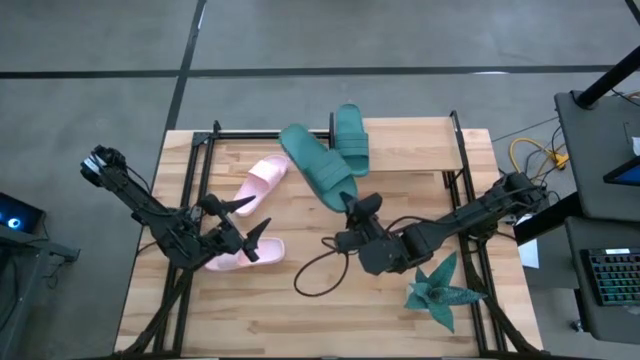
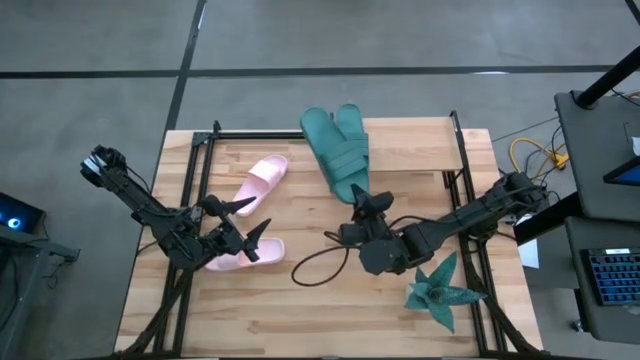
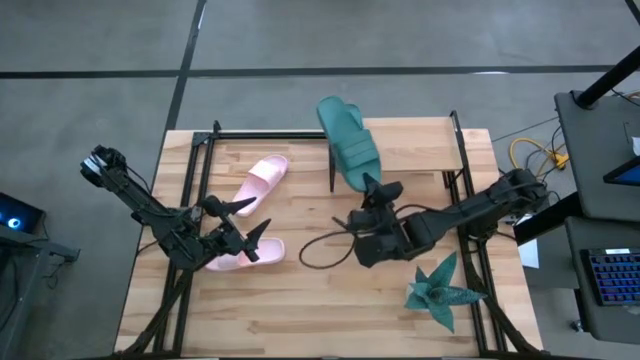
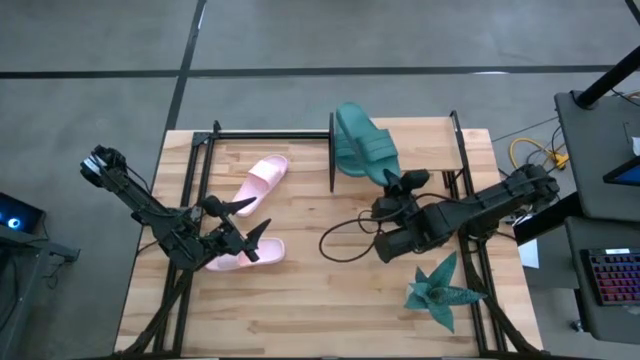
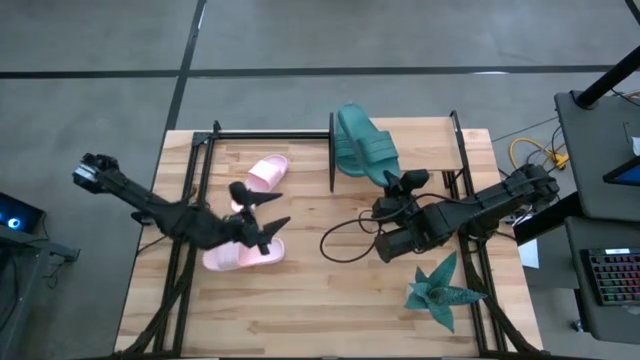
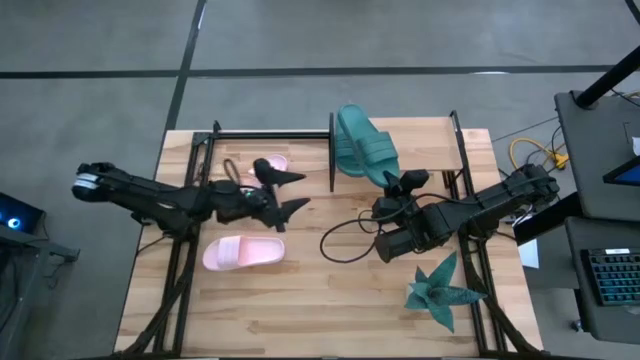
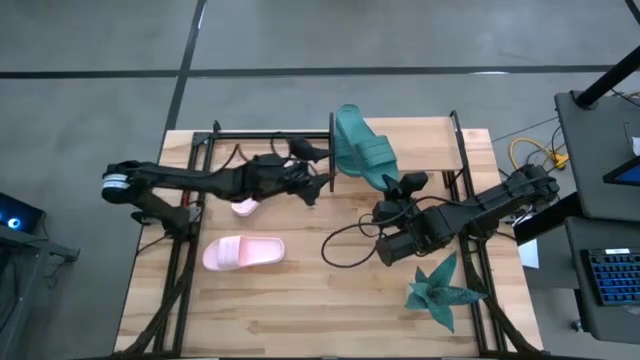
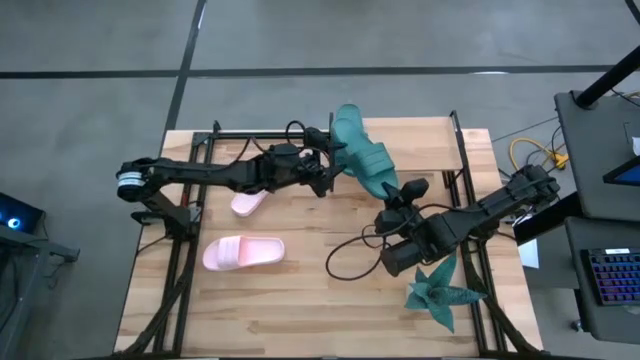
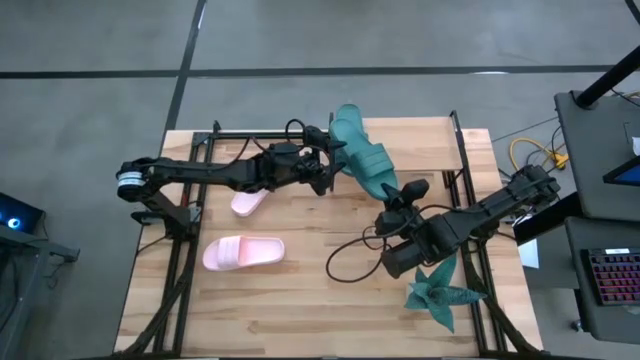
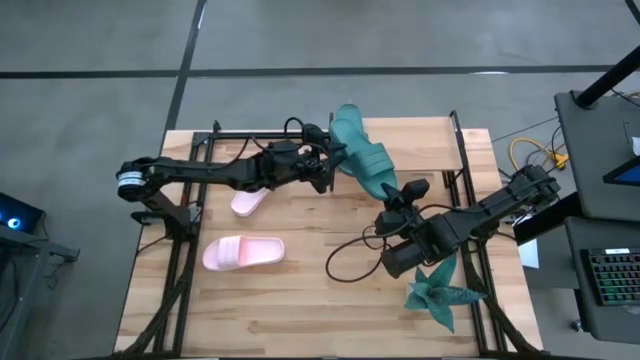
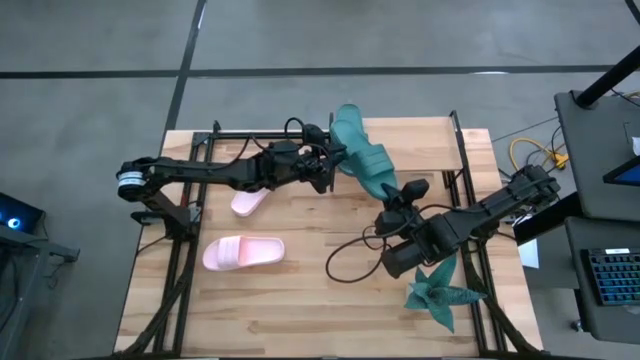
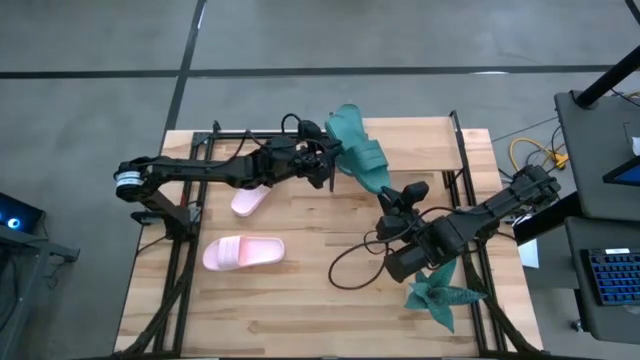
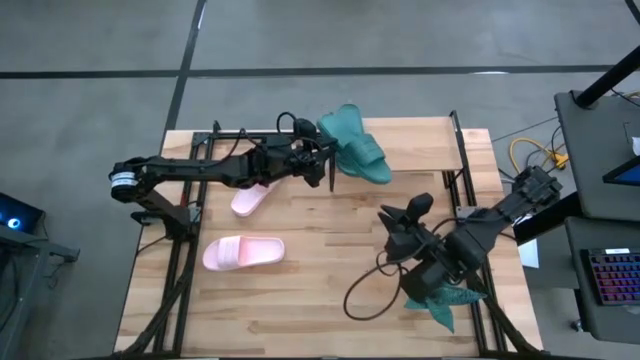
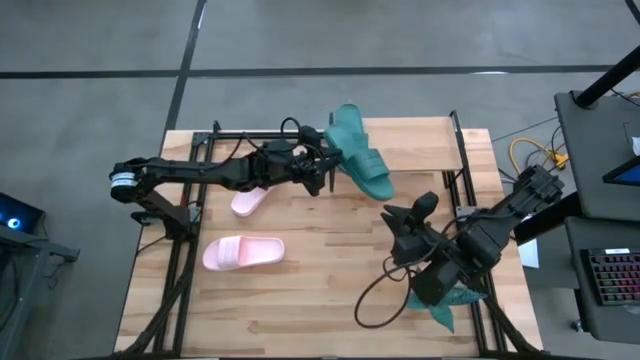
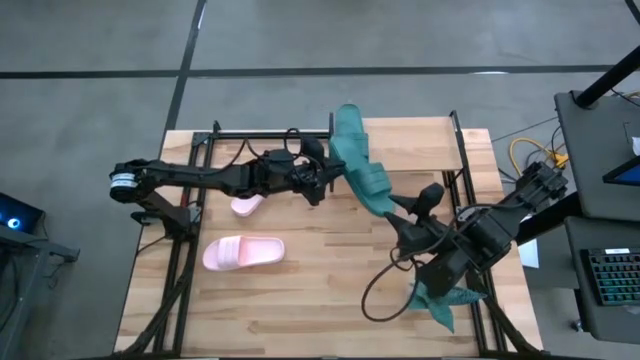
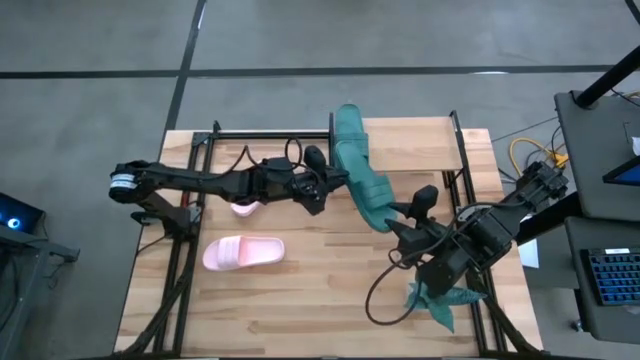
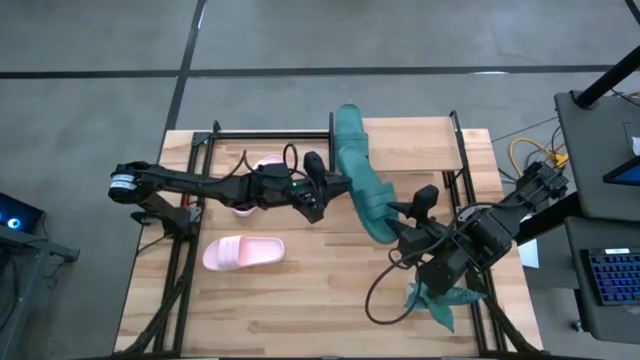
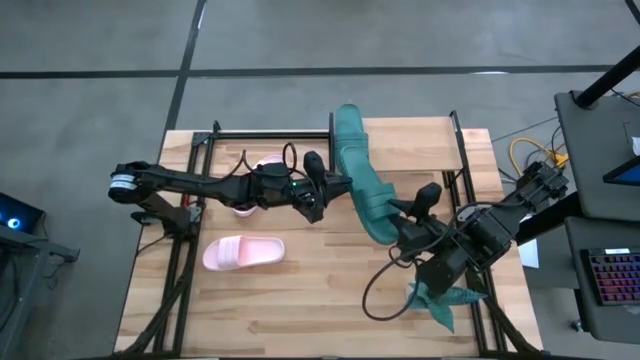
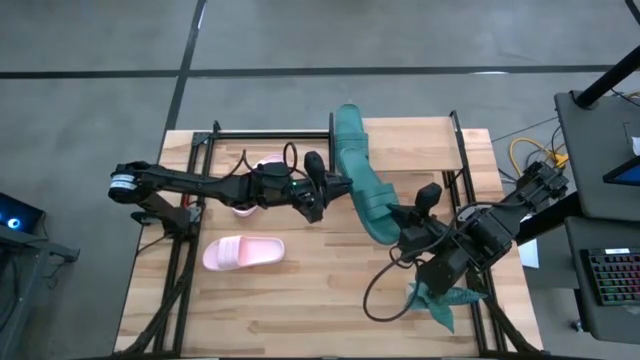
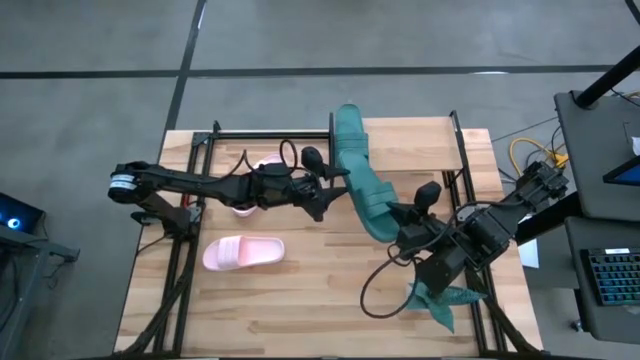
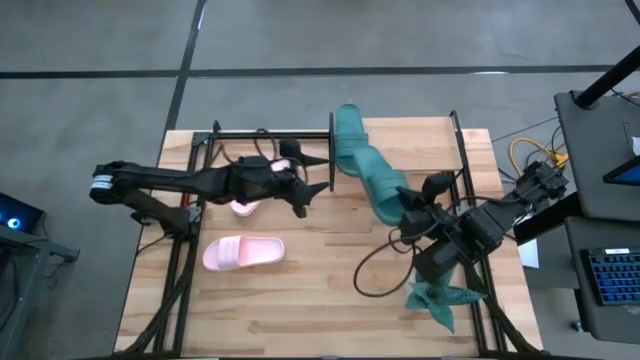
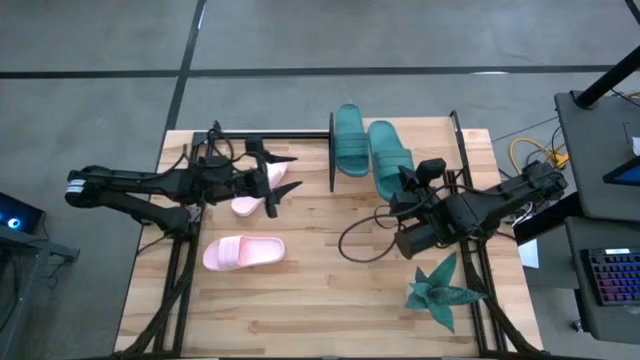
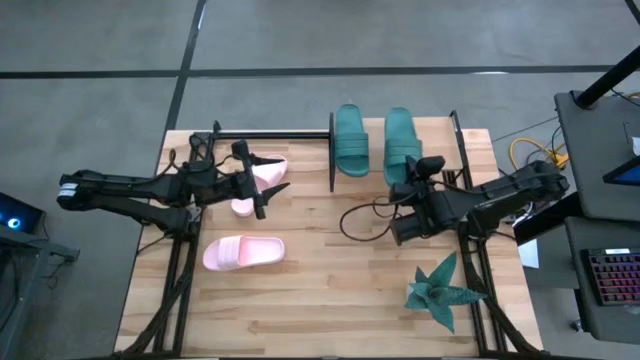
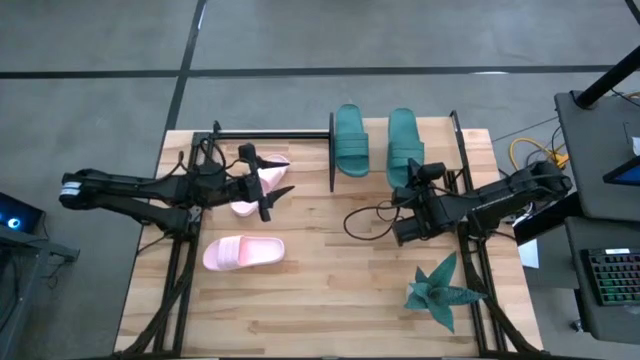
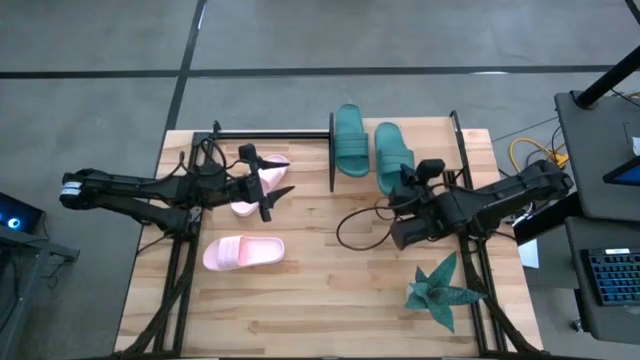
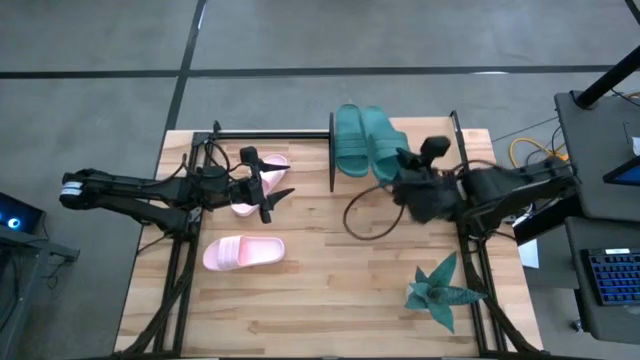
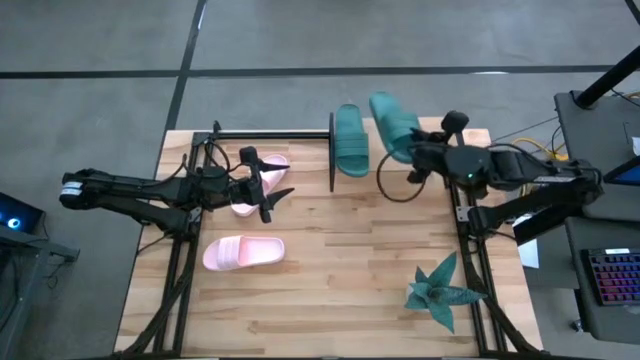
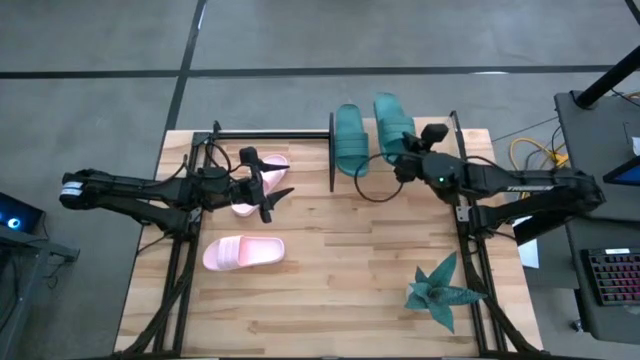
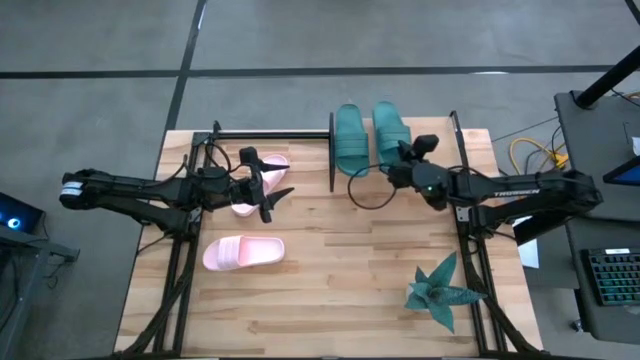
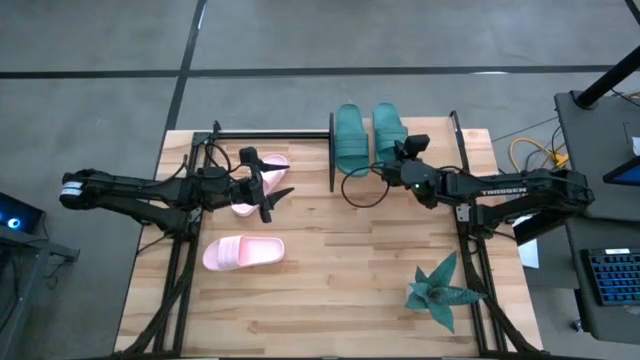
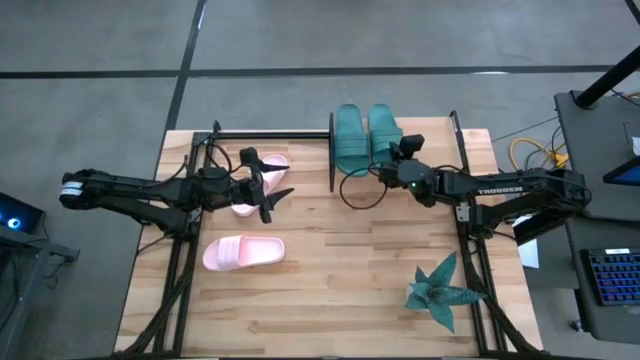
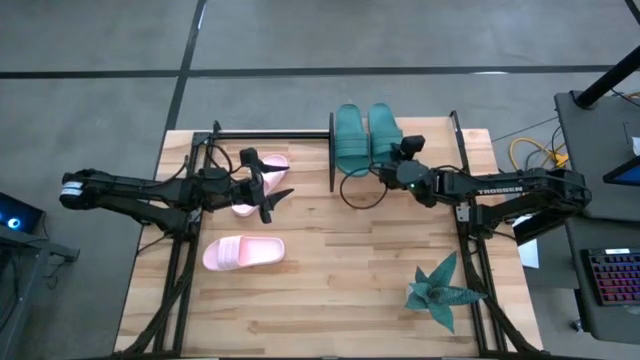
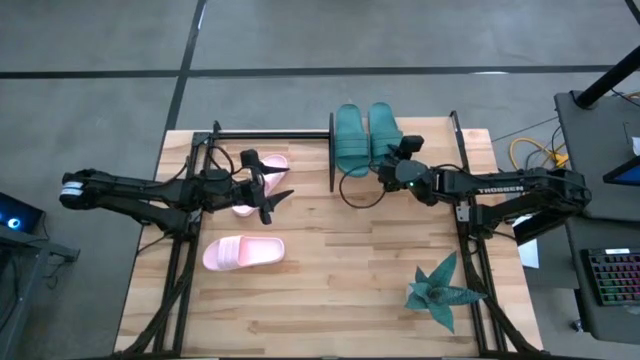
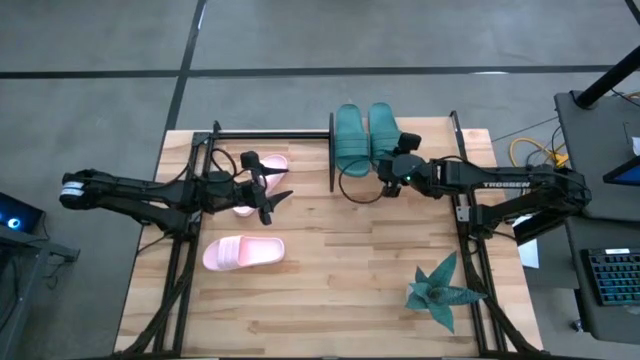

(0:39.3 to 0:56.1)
Task: Pick and place slides into the shelf
Put the green slipper on the shelf

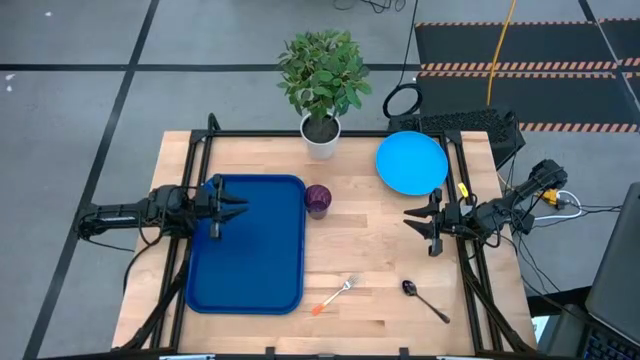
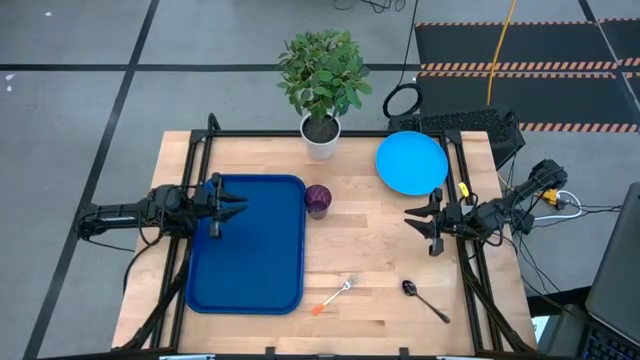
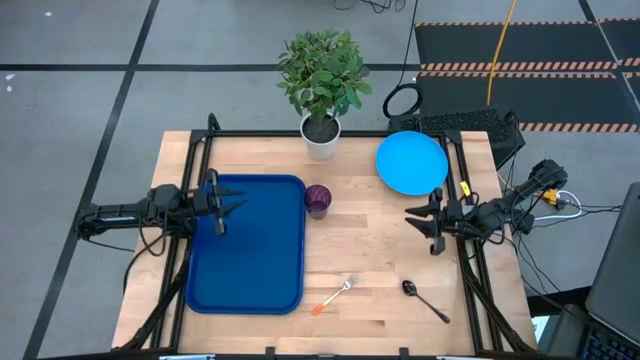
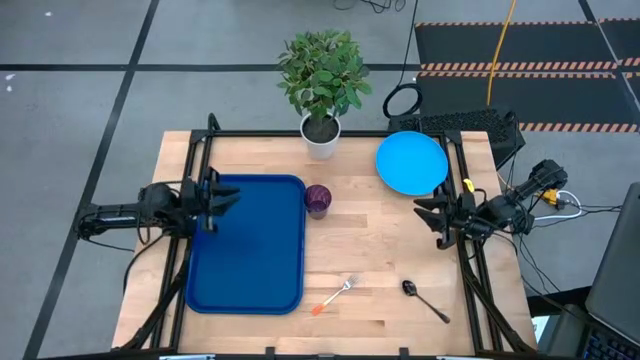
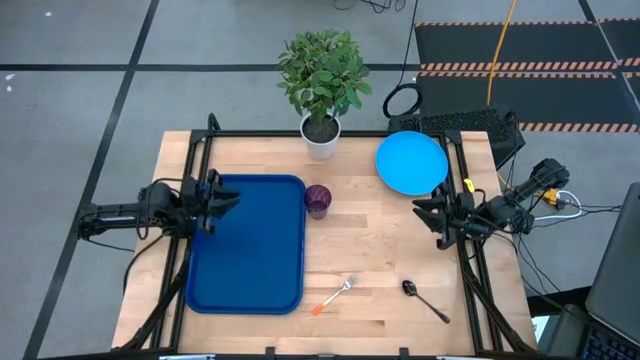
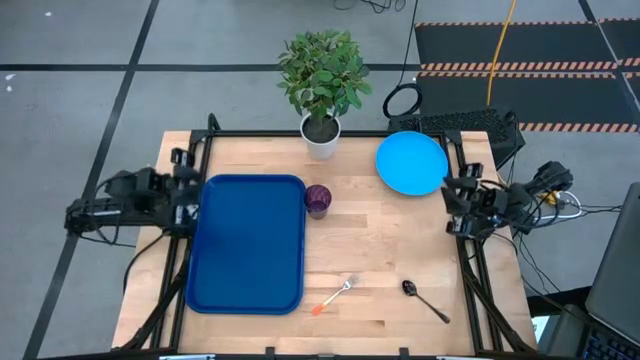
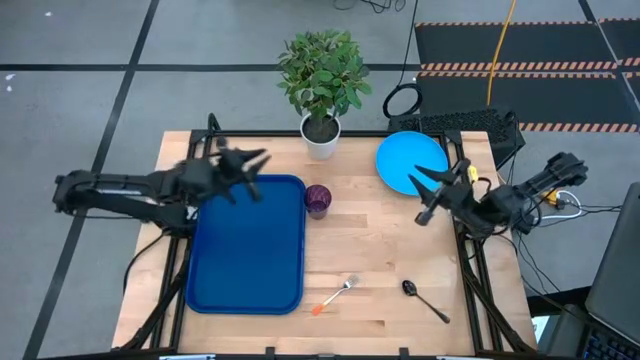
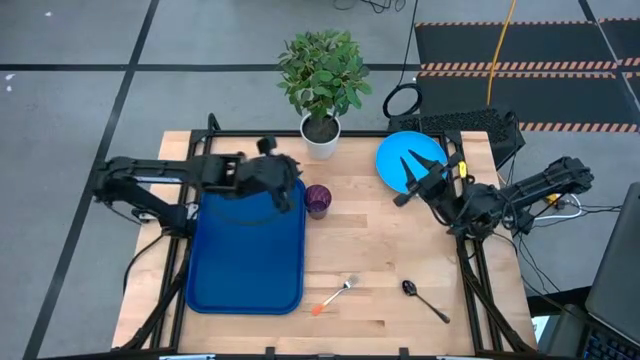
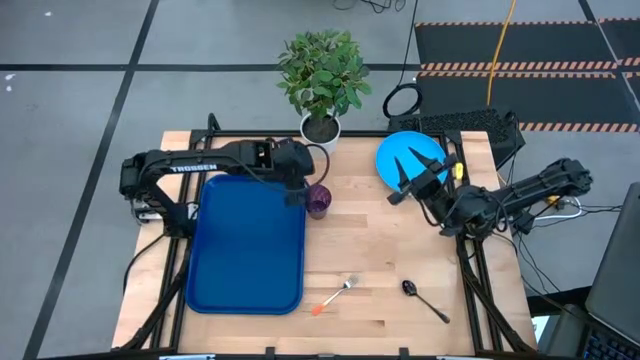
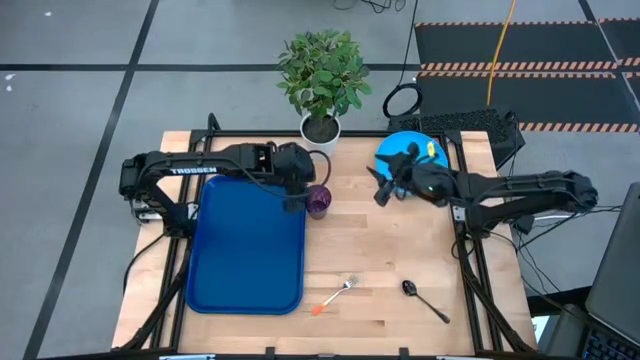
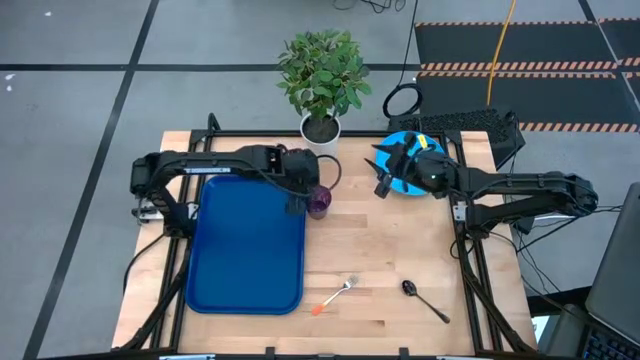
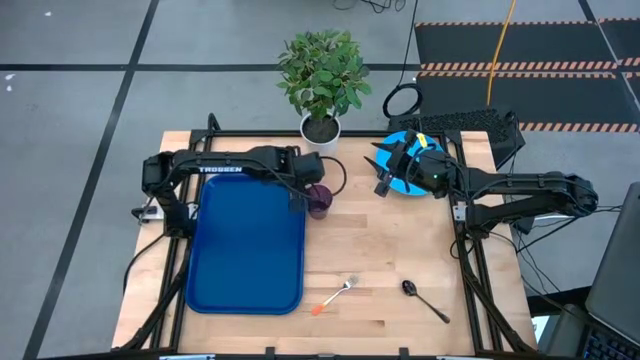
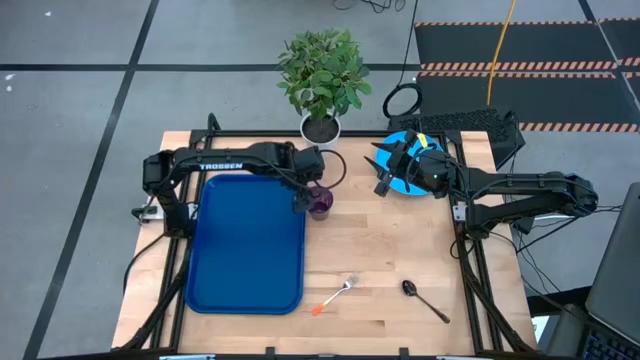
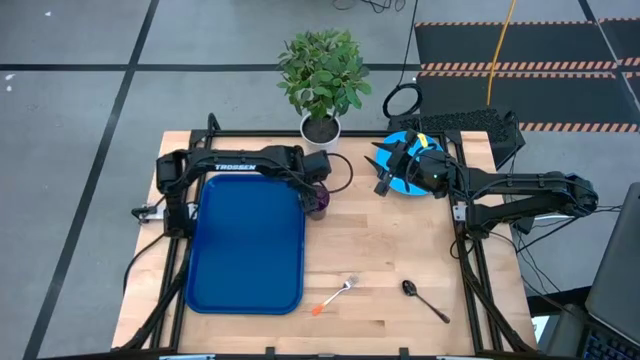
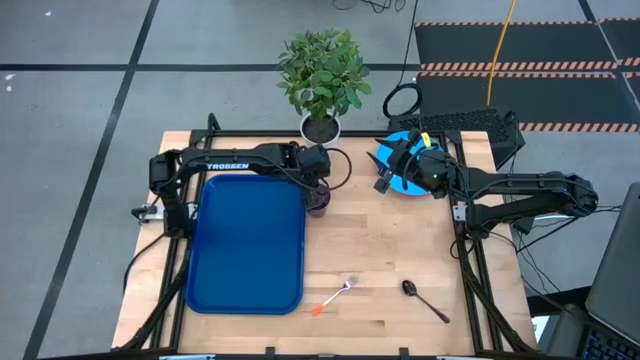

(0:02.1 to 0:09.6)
Task: Pick and place plate/cup/fork/spoon on tray
Put the violet cup on the blue serving tray
